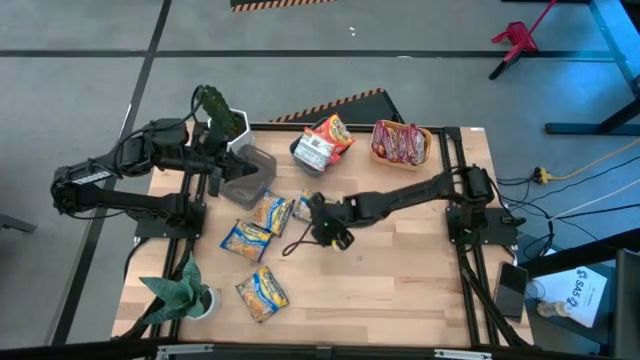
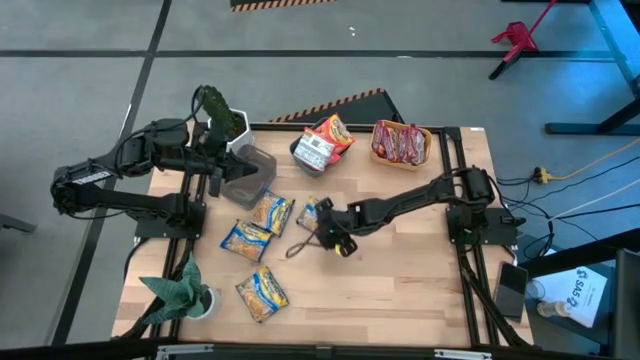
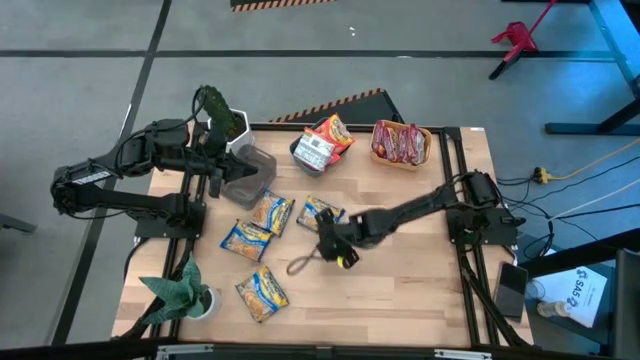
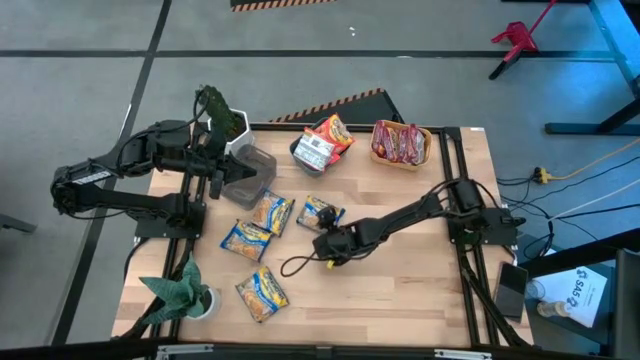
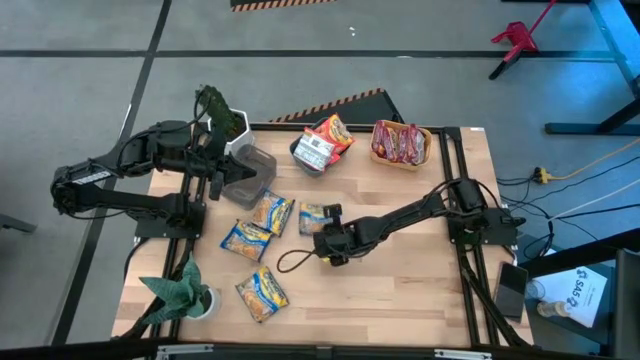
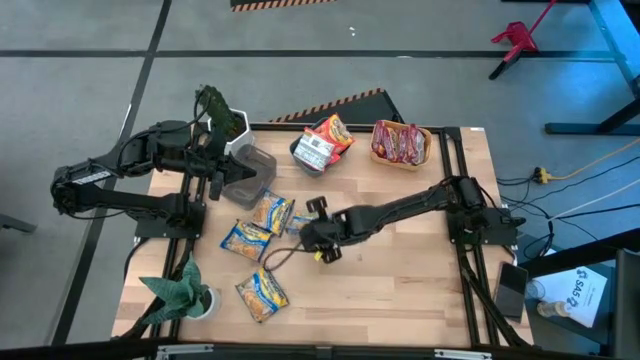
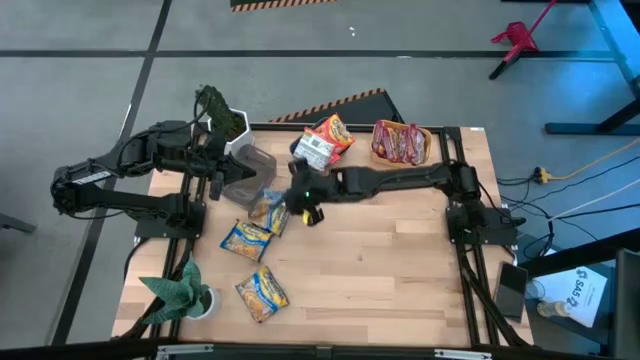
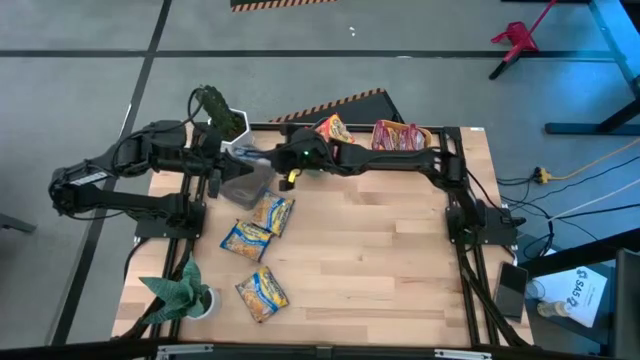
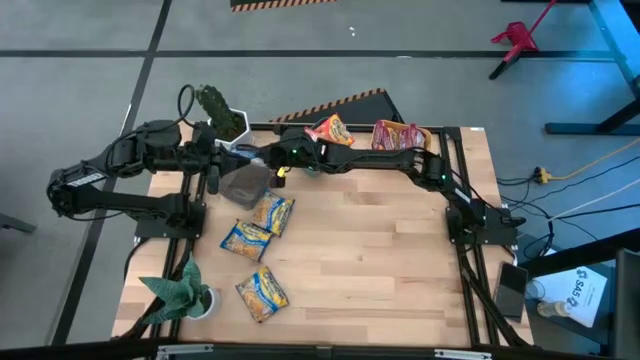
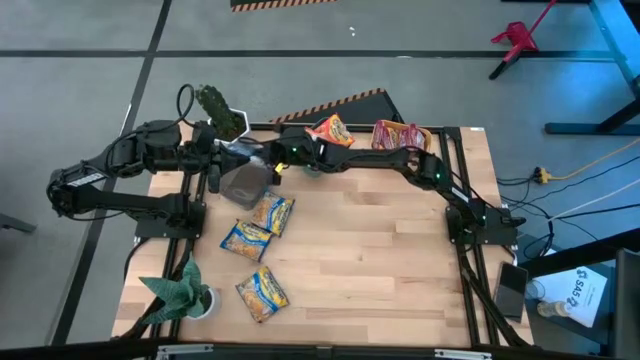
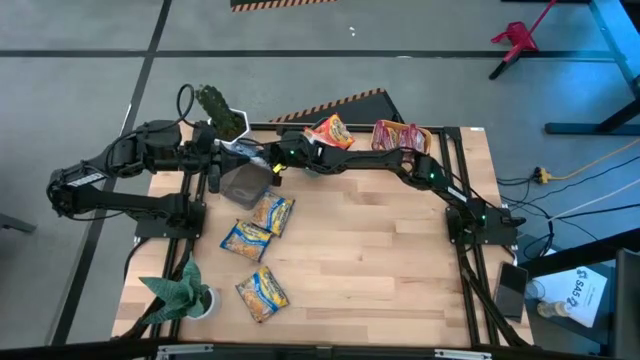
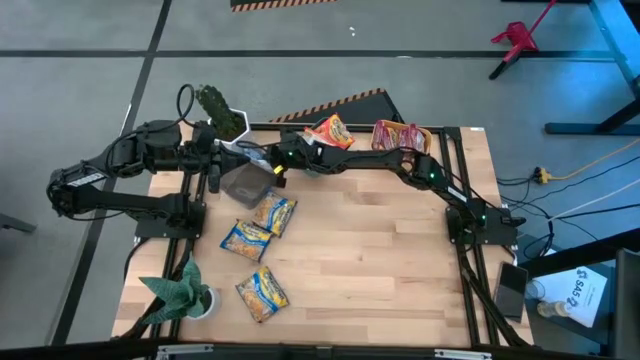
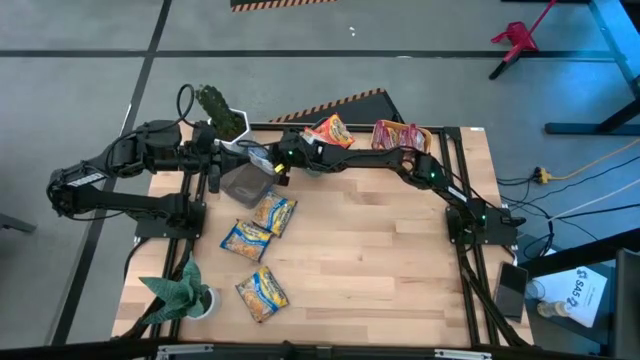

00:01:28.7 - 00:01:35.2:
Task: Sort Maruchan noodles
Put the blue noodle pack into the black bin

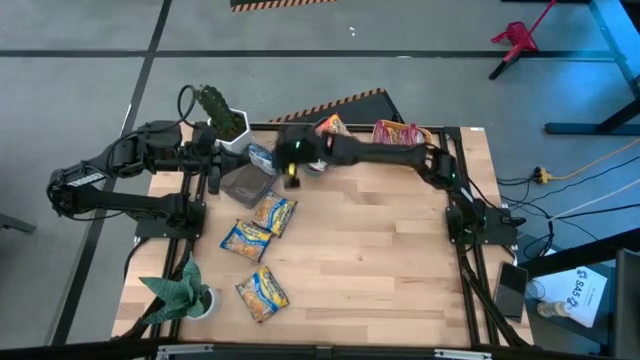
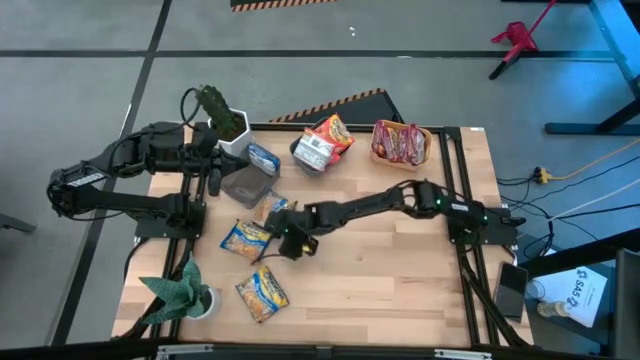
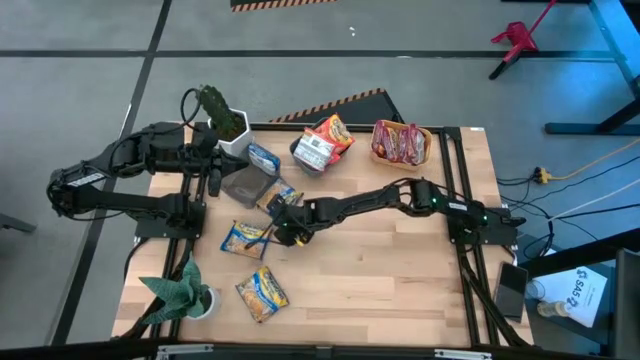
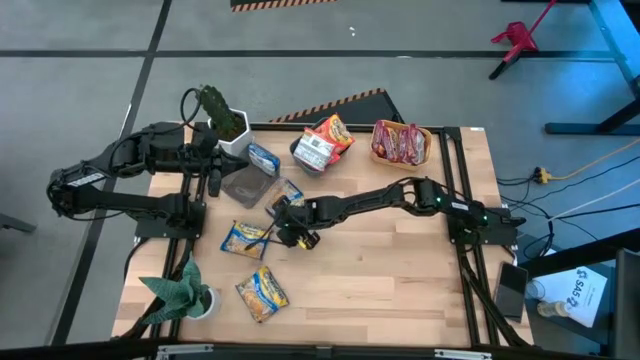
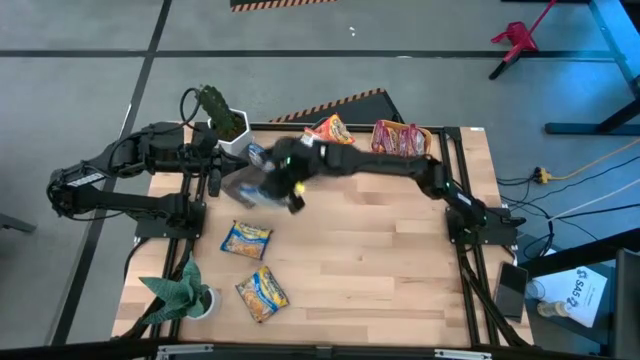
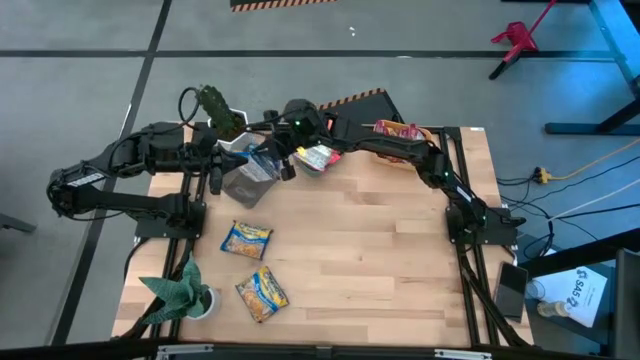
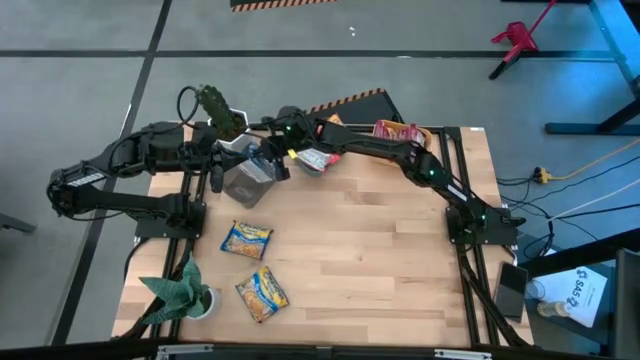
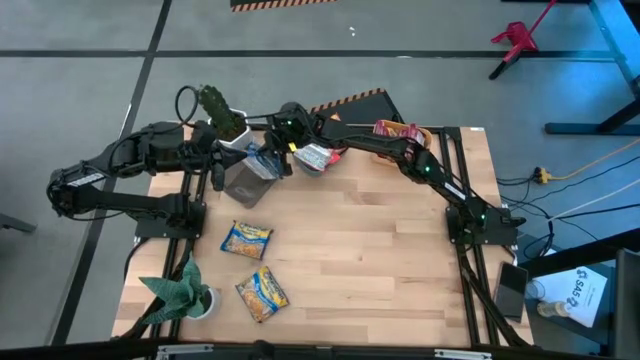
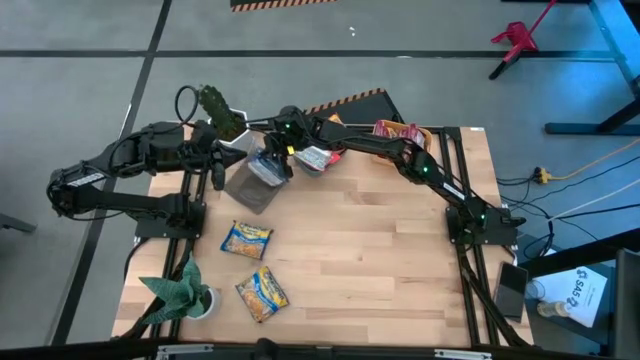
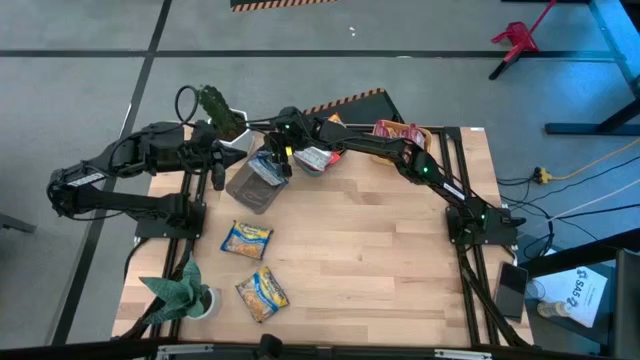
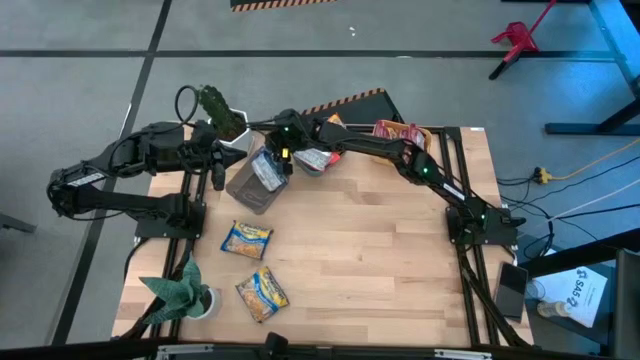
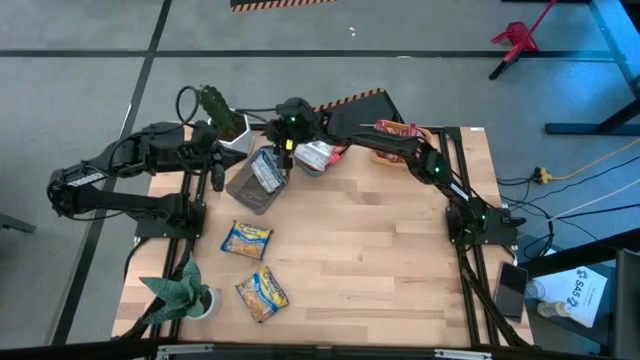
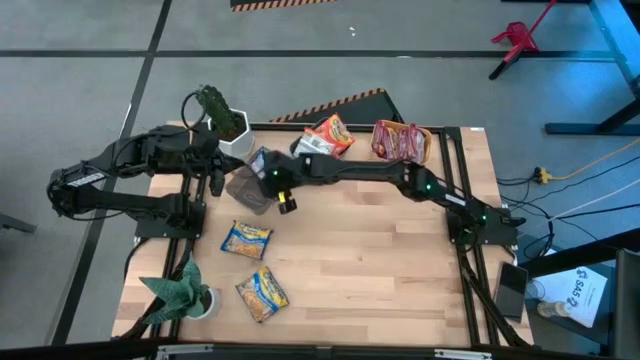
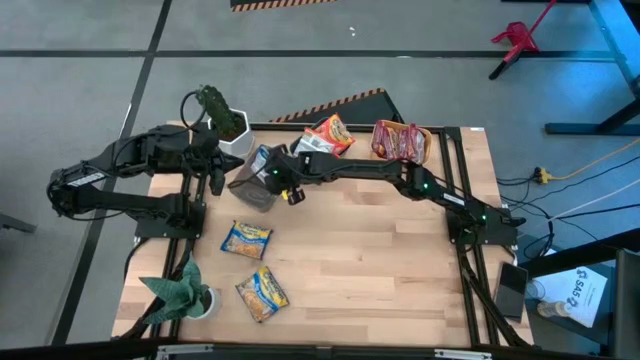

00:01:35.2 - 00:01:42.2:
Put the top blue noodle pack into the black bin

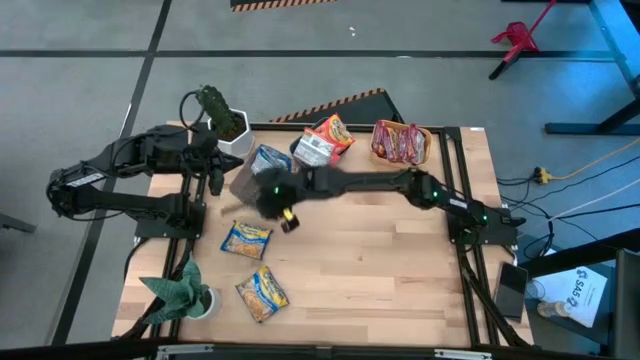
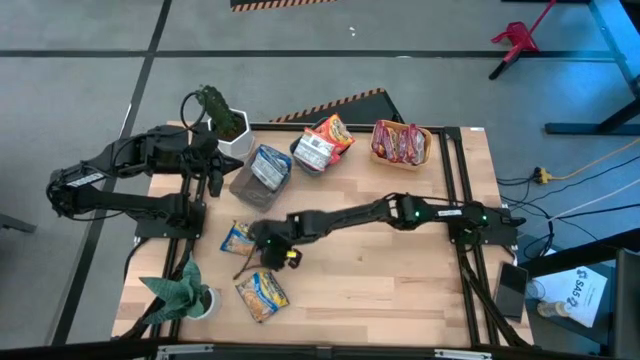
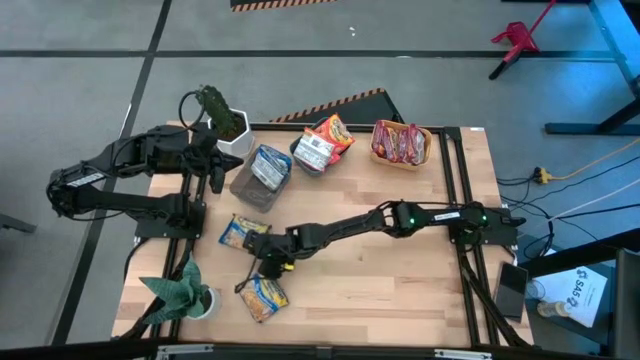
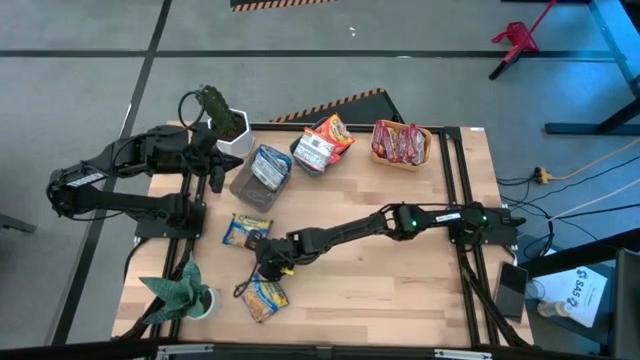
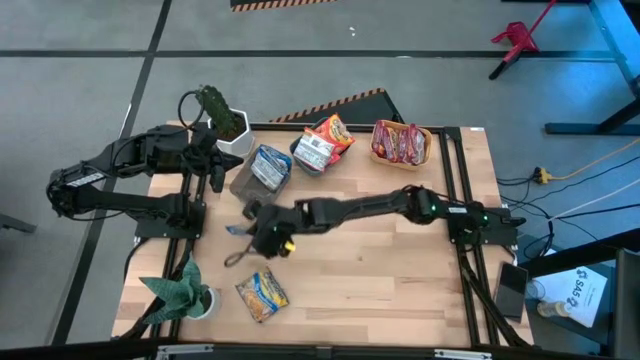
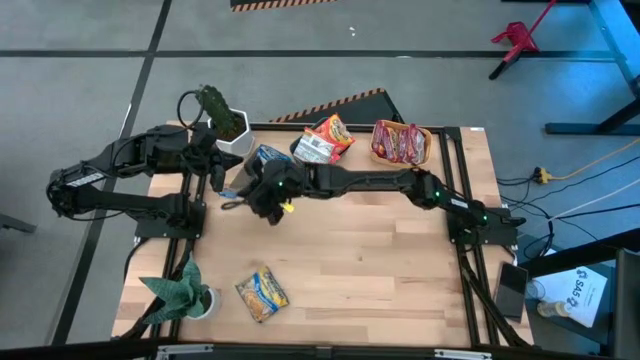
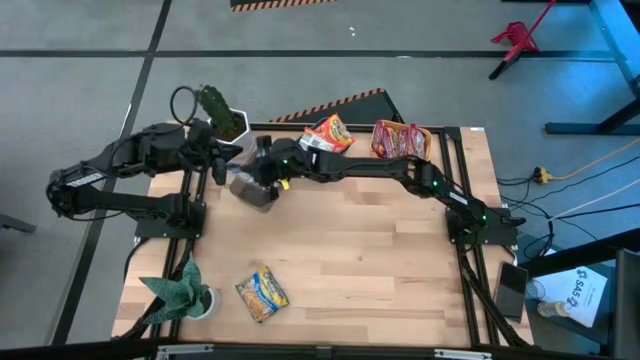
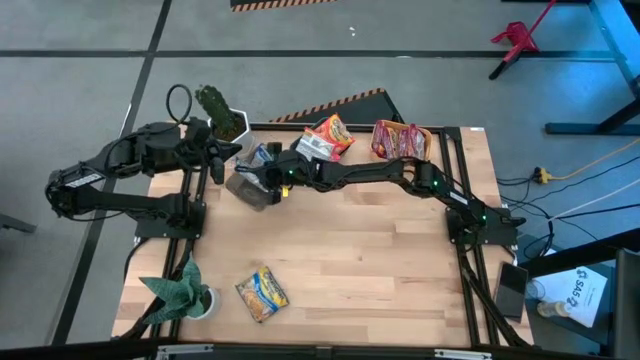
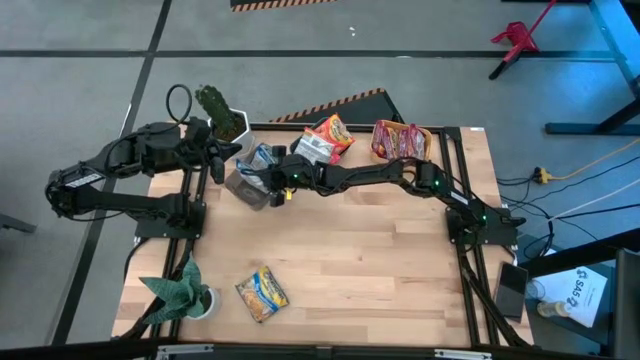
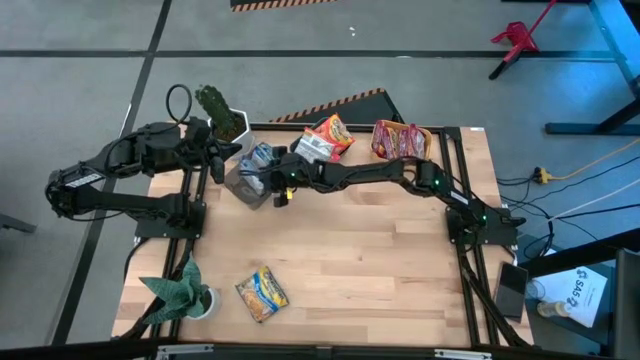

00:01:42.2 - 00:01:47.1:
Put the top blue noodle pack into the black bin

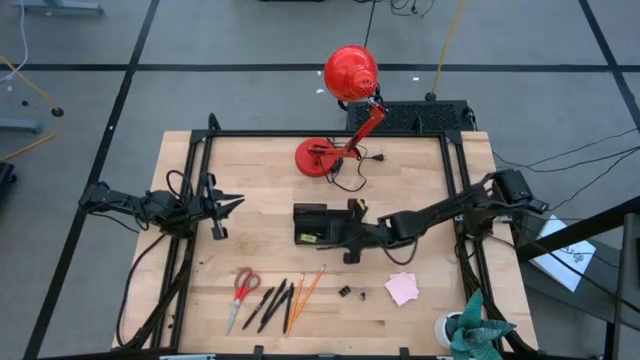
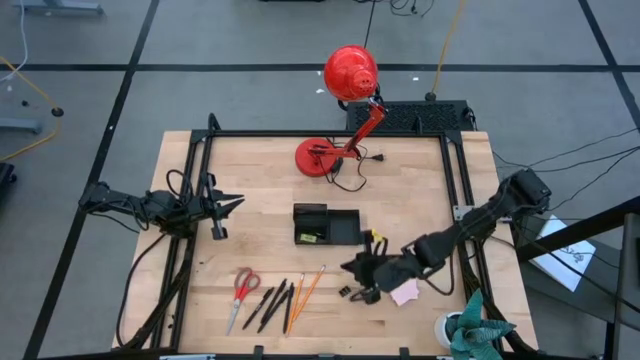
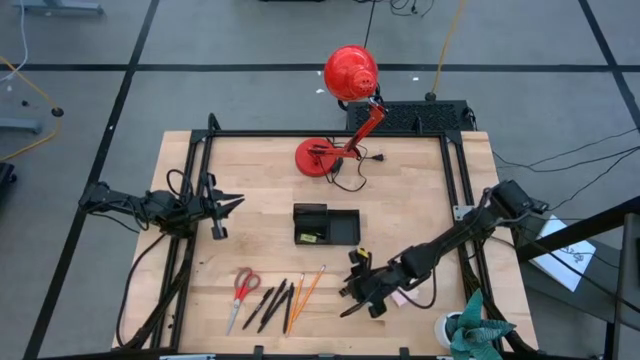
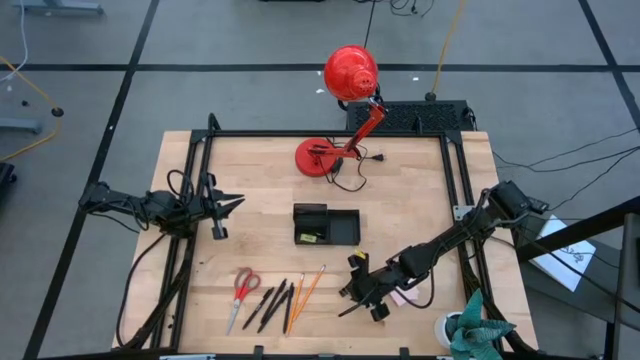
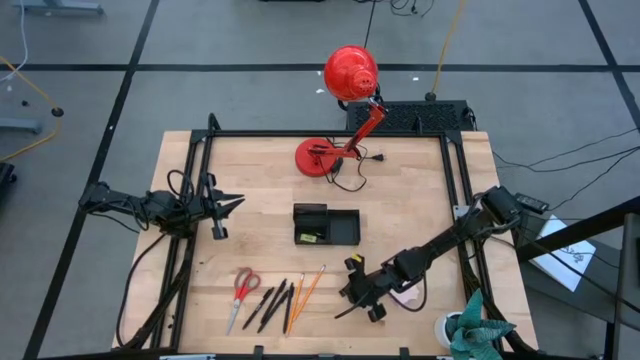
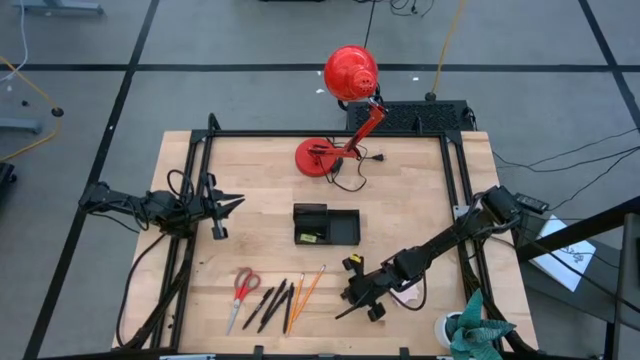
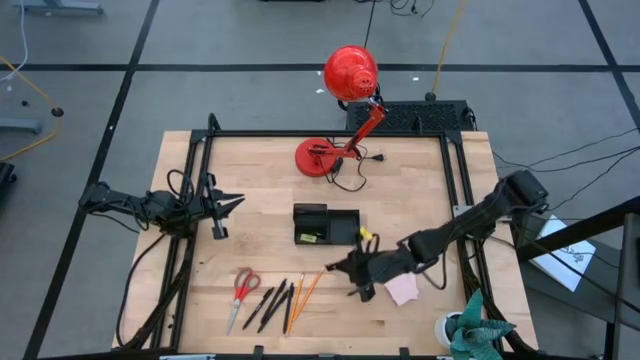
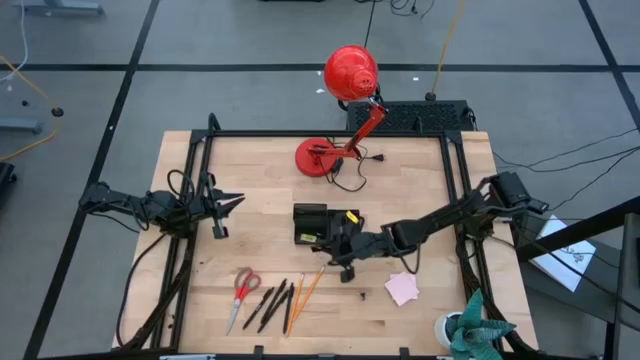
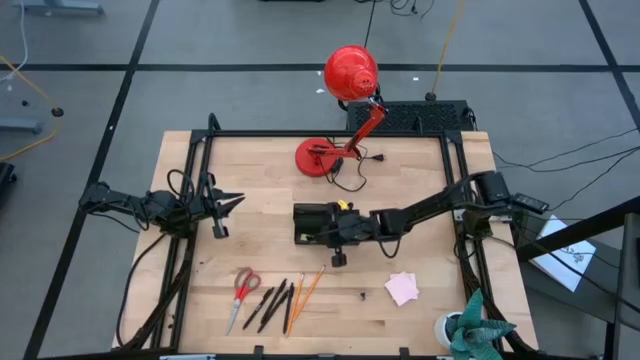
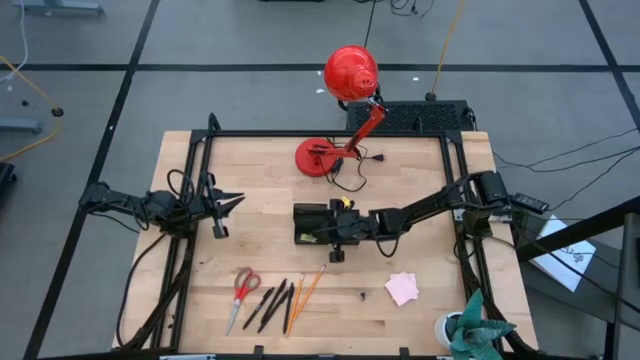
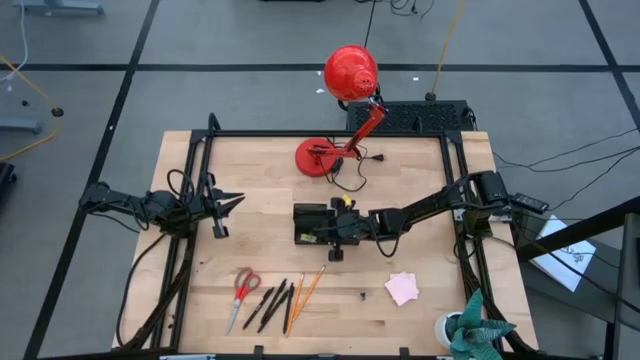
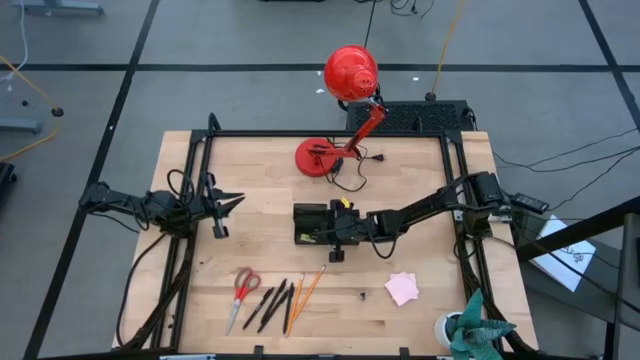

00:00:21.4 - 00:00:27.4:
Task: Pick and place office supplies into organizer
Put the left black binder clip into the desk organizer
